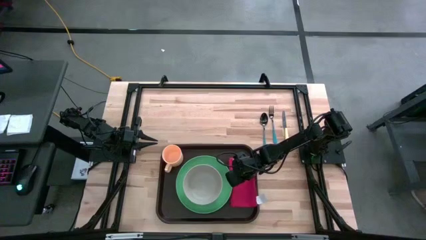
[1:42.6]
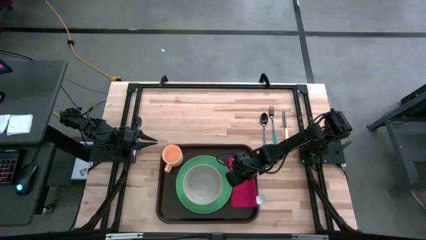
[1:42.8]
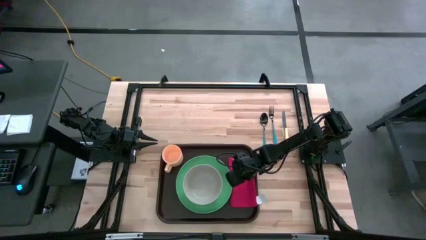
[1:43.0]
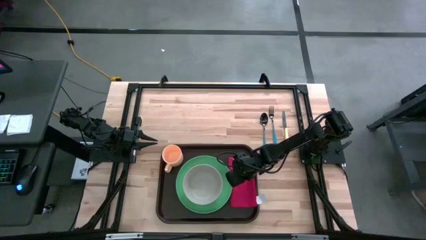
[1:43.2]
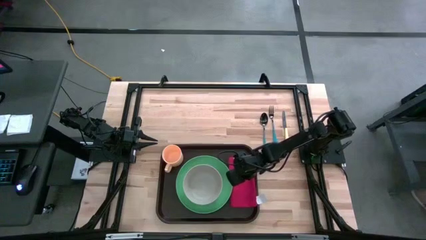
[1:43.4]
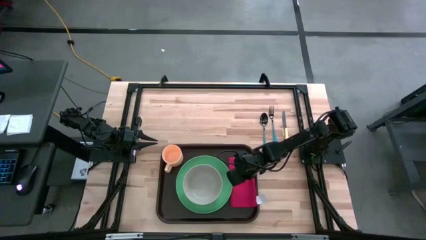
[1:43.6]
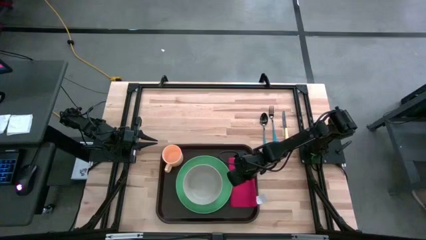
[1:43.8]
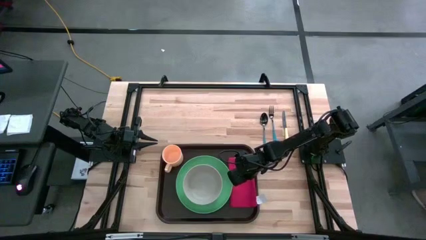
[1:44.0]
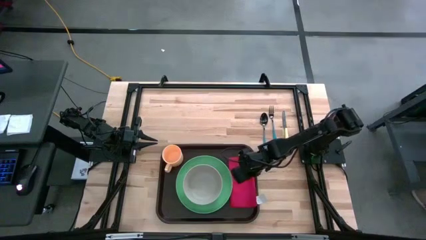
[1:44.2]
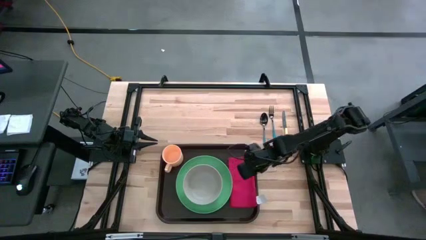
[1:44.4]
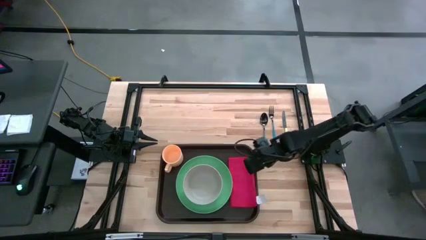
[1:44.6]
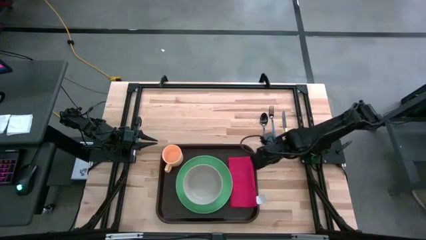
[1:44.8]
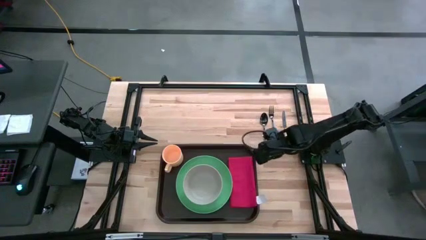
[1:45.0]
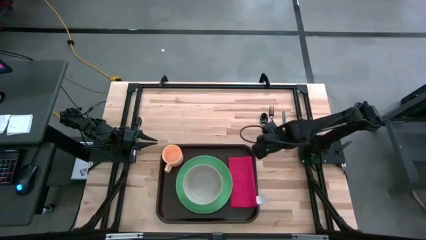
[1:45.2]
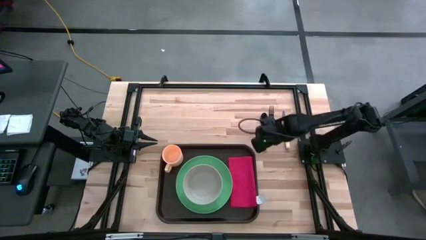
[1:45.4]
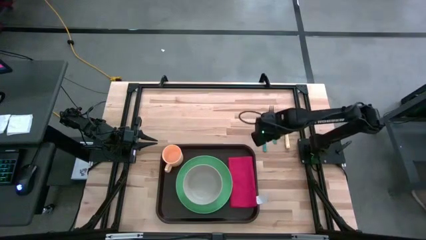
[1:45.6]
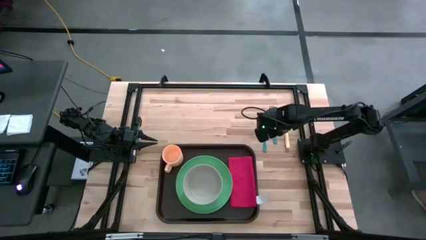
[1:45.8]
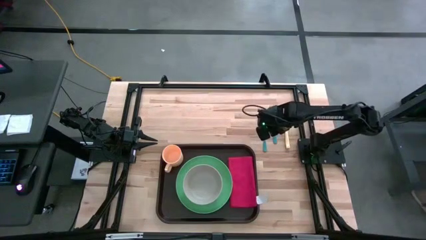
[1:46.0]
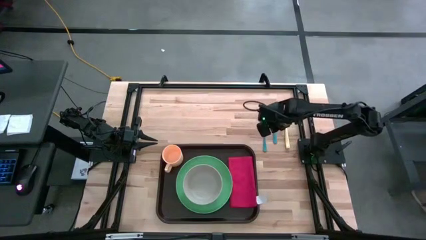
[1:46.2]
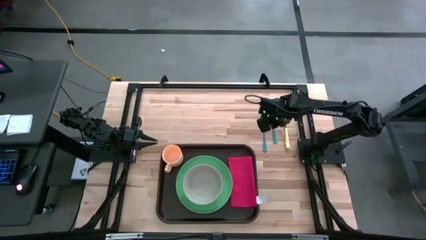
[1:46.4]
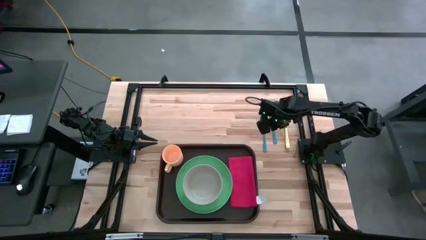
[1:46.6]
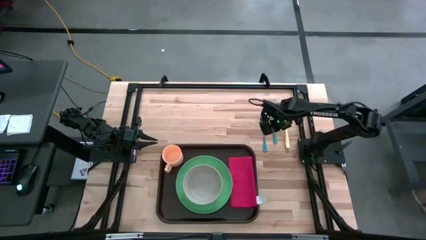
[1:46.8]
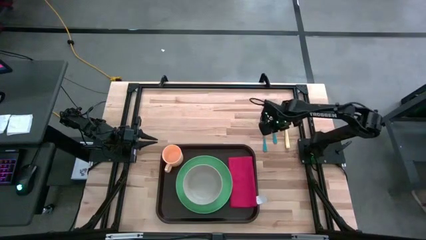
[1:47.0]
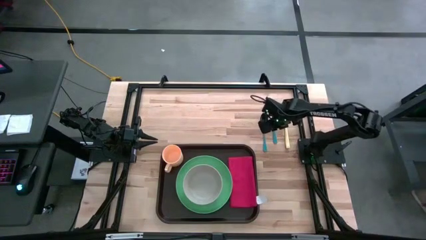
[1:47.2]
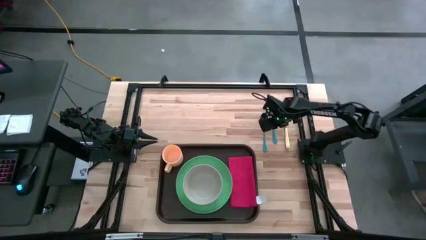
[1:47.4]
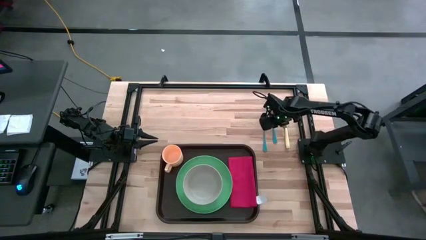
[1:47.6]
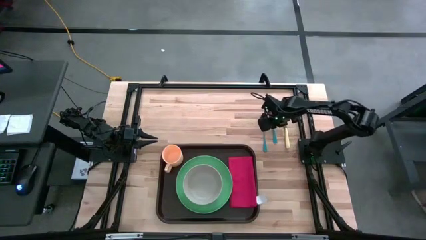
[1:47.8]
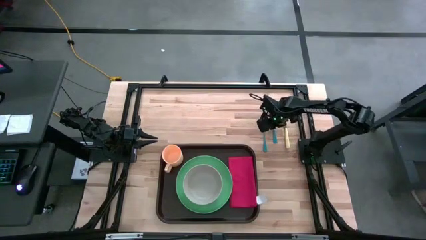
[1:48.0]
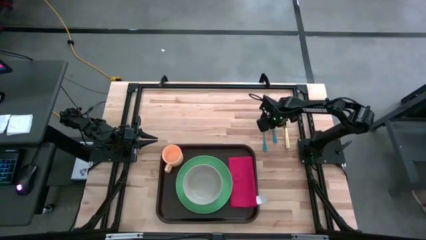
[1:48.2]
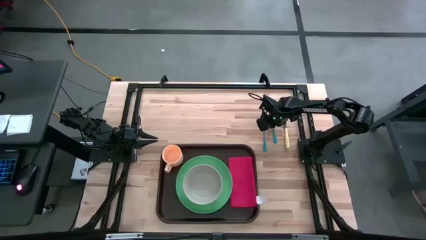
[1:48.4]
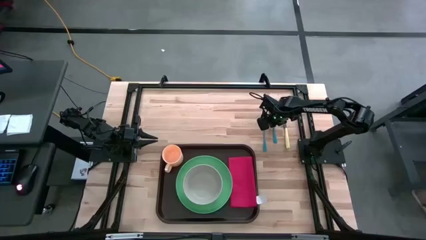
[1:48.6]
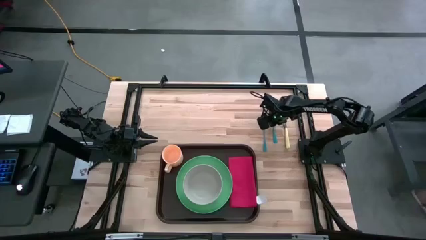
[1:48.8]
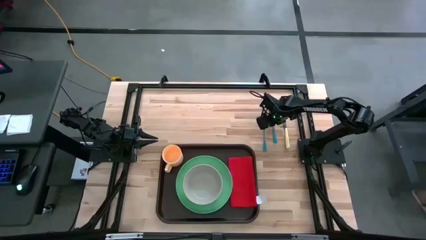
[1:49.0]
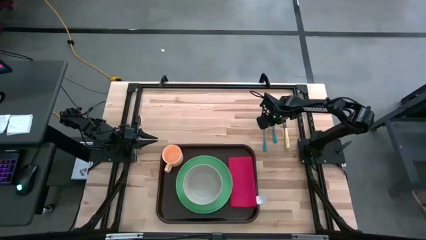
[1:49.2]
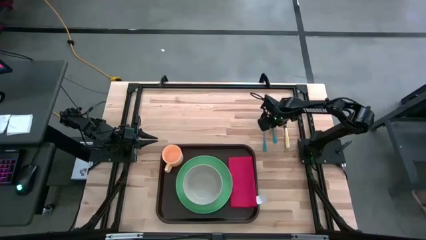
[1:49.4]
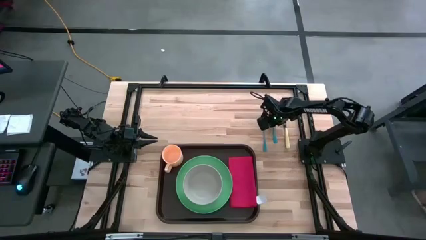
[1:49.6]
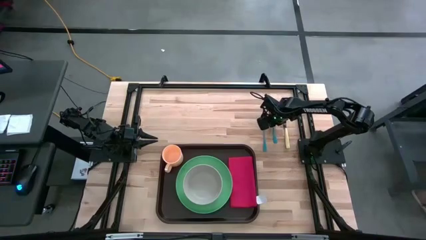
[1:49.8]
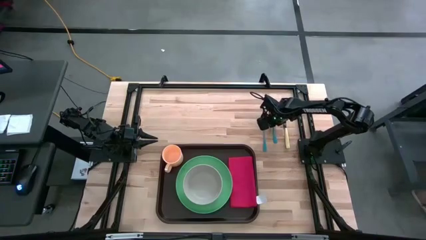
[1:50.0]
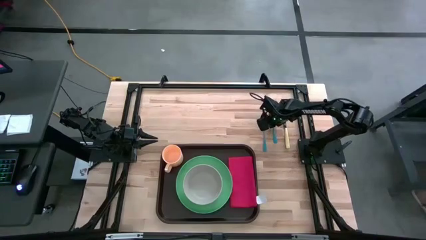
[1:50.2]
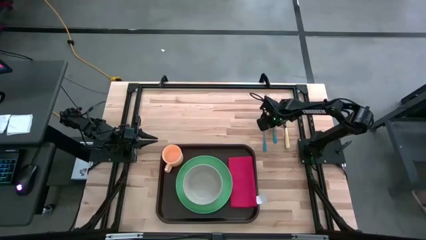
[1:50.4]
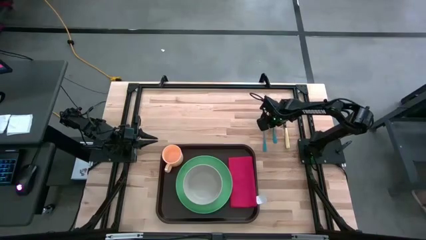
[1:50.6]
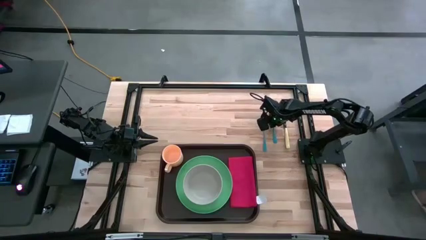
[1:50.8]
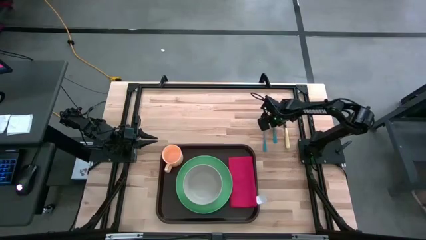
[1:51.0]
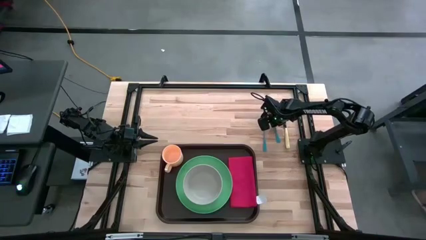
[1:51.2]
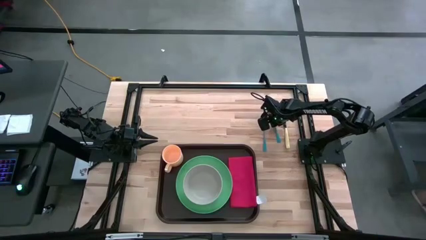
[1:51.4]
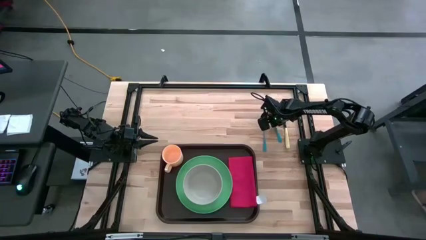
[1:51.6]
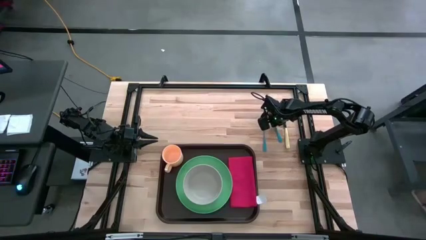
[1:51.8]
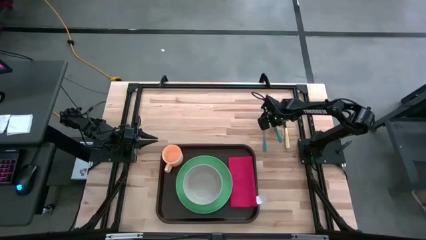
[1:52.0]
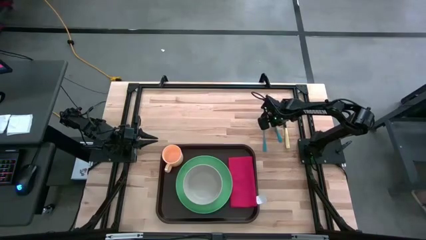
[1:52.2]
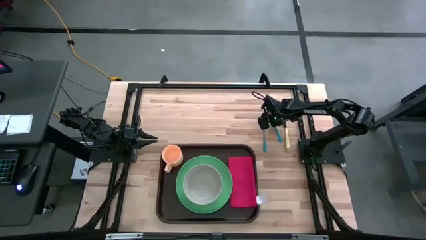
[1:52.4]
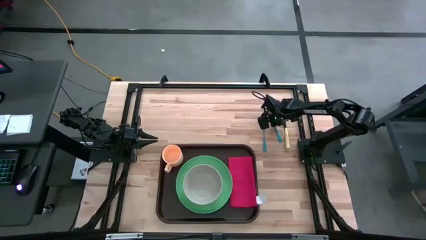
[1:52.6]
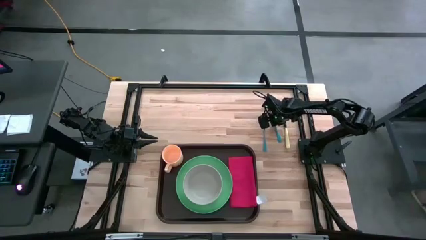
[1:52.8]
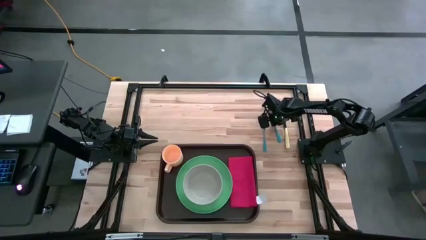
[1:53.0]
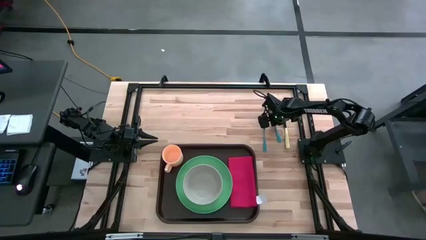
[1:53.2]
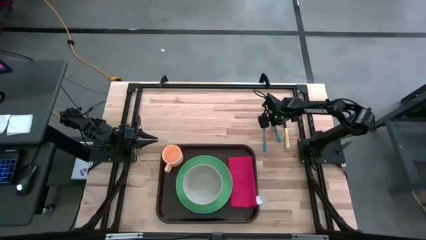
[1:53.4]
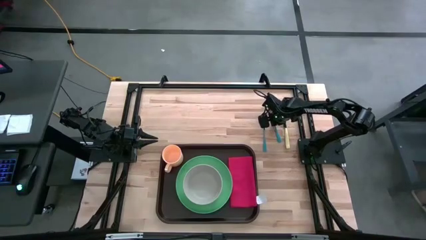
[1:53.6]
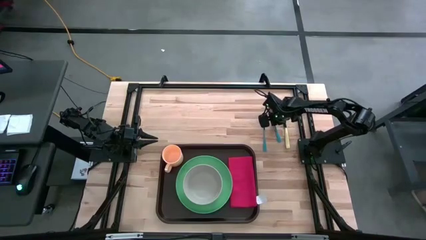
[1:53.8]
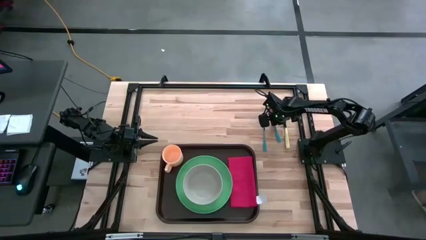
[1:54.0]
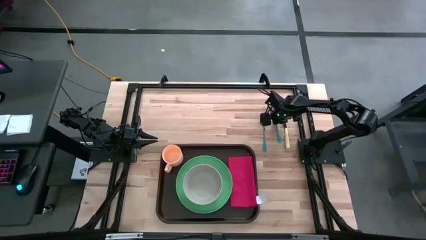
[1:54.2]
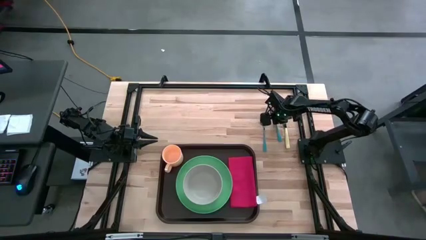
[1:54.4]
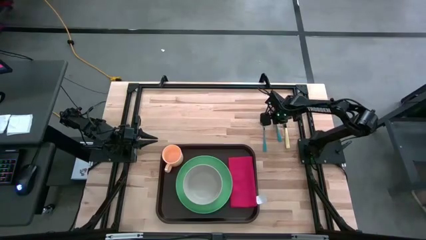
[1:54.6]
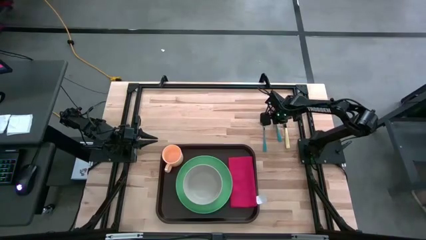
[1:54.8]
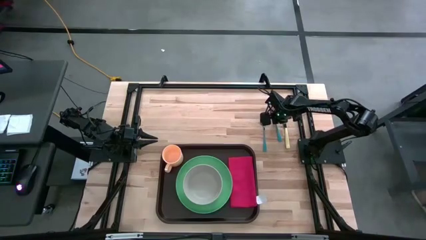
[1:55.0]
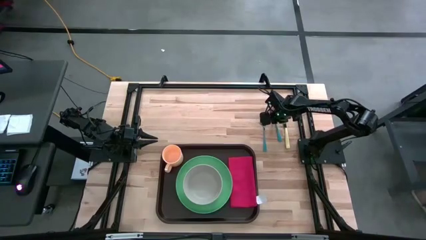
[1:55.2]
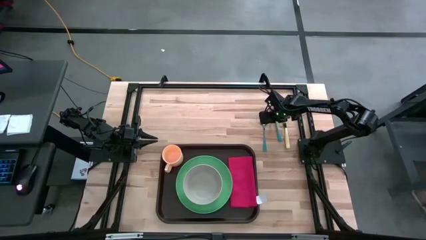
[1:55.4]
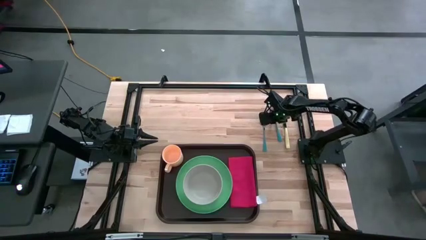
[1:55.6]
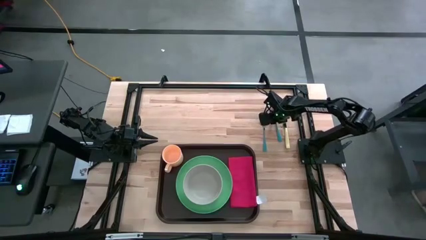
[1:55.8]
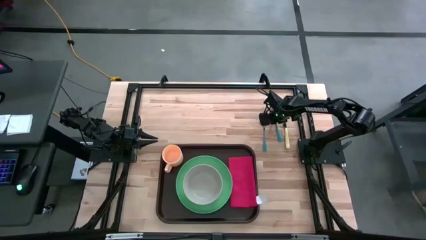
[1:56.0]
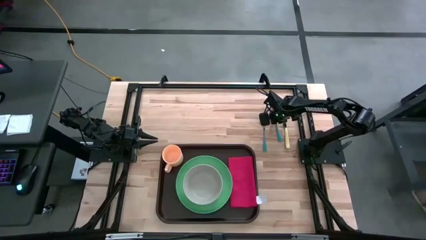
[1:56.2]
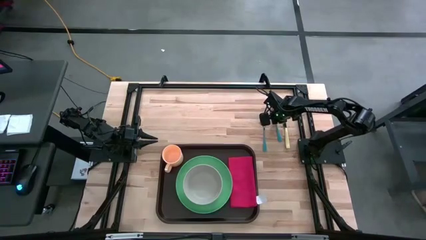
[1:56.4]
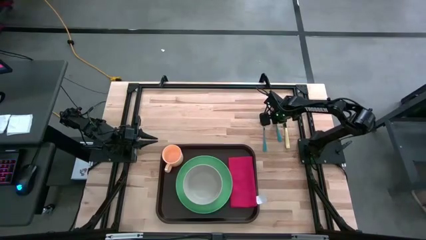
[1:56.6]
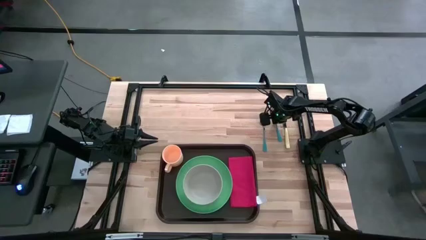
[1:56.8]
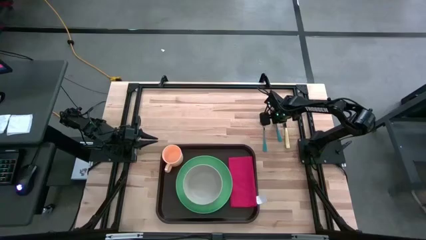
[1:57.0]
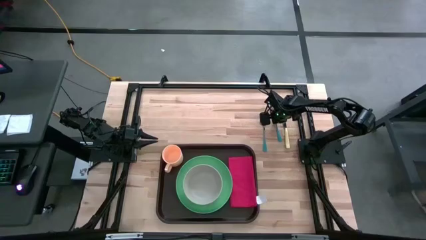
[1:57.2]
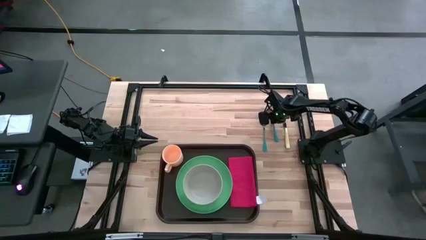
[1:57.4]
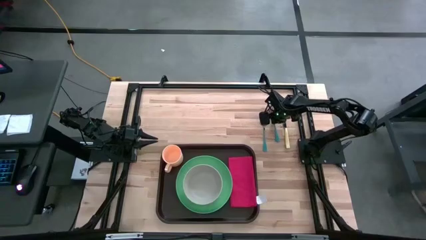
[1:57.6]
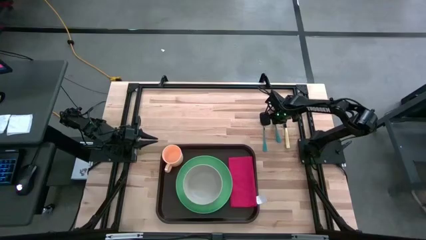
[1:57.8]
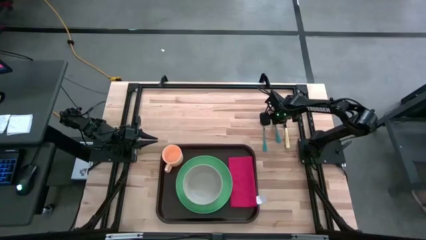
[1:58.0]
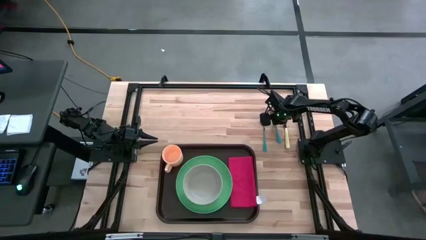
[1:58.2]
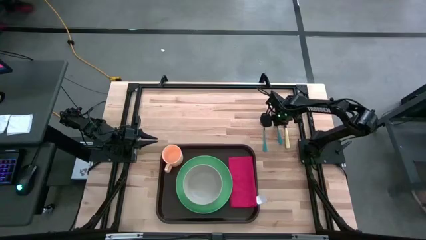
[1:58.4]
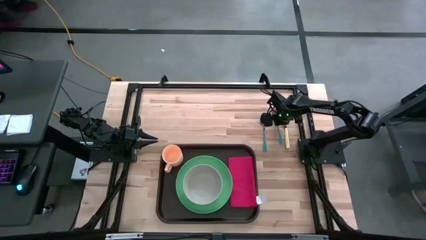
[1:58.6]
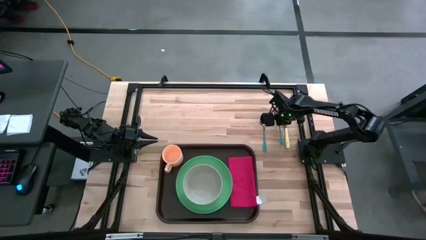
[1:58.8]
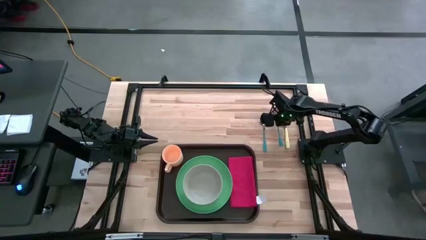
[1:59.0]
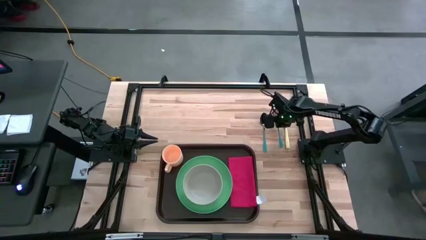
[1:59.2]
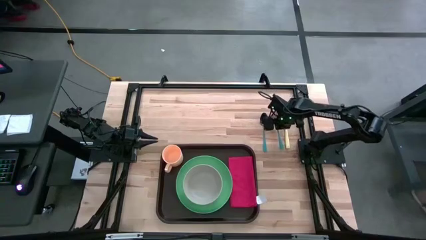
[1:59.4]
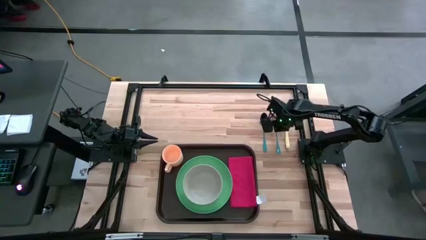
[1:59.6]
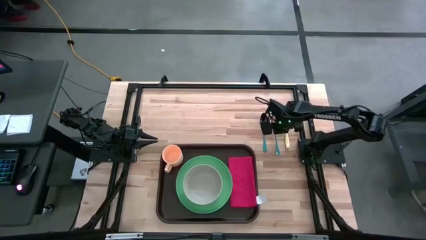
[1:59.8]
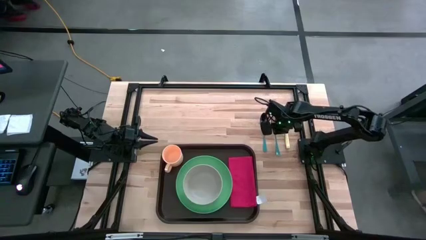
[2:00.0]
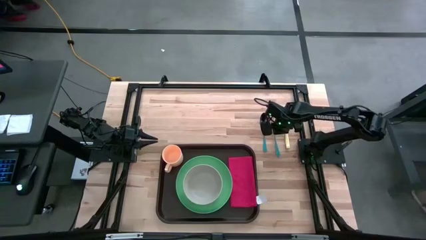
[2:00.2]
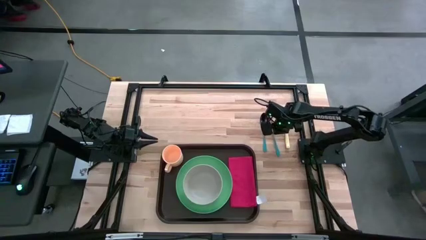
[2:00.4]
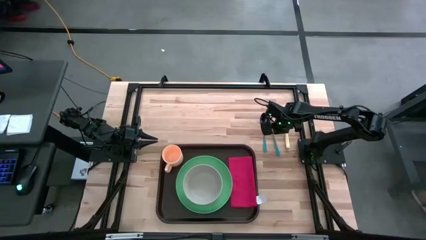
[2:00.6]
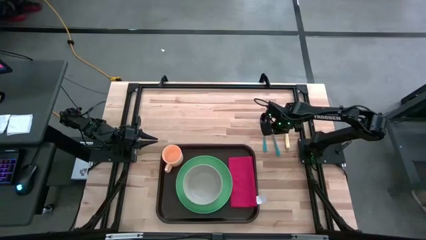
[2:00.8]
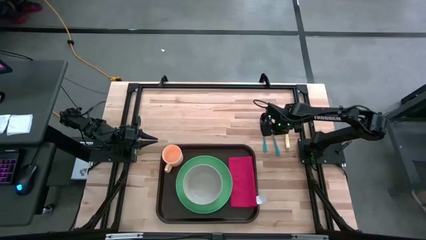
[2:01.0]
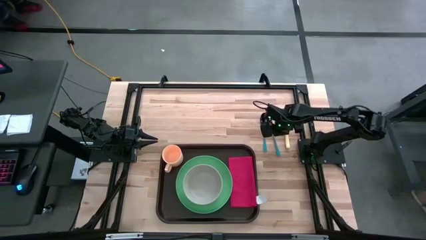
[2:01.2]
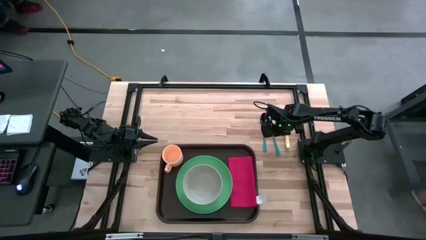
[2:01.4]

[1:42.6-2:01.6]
Task: Set up tray
Put the blue fork on the table napkin to the right of the green plate on the serving tray
